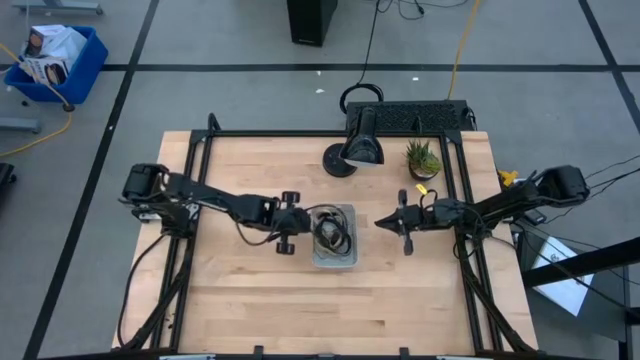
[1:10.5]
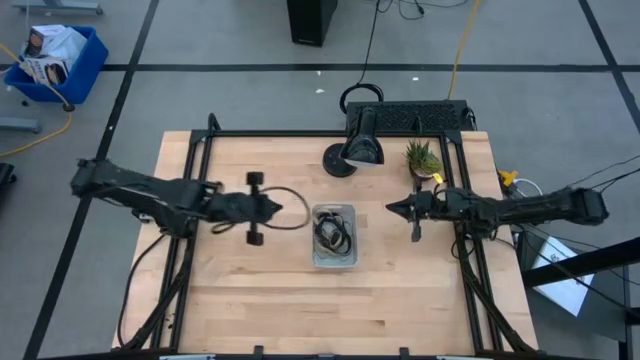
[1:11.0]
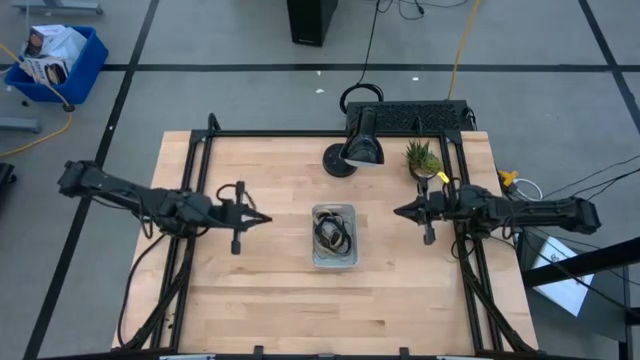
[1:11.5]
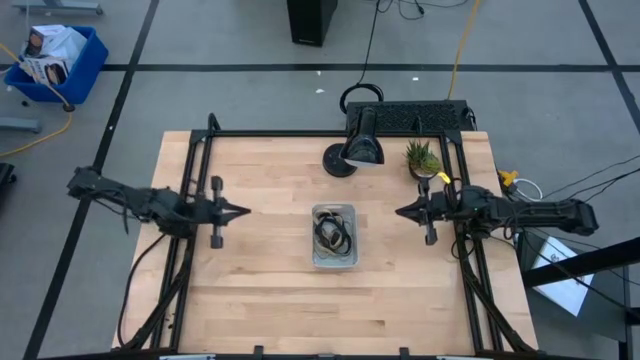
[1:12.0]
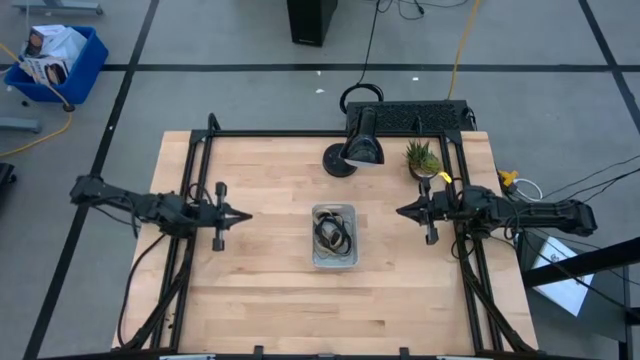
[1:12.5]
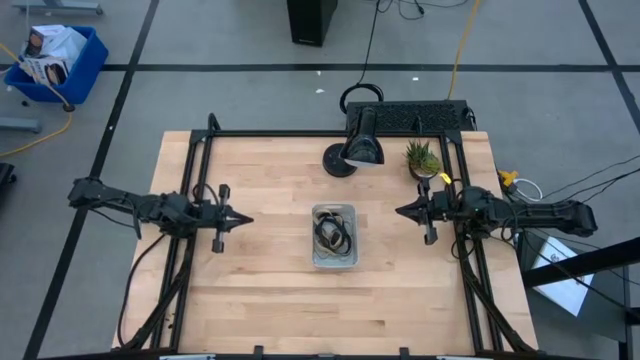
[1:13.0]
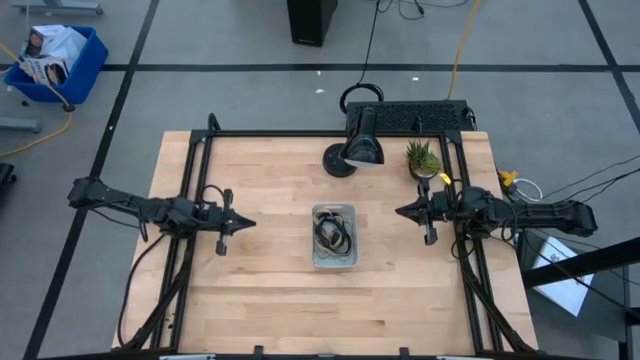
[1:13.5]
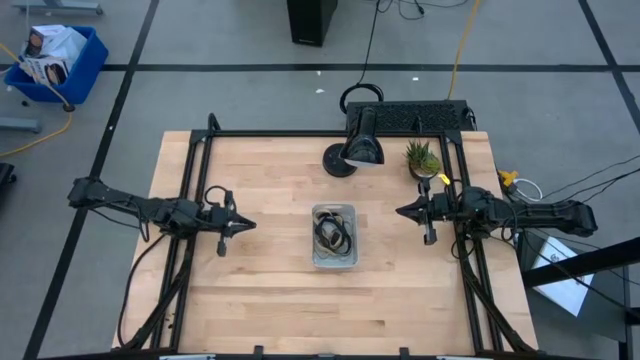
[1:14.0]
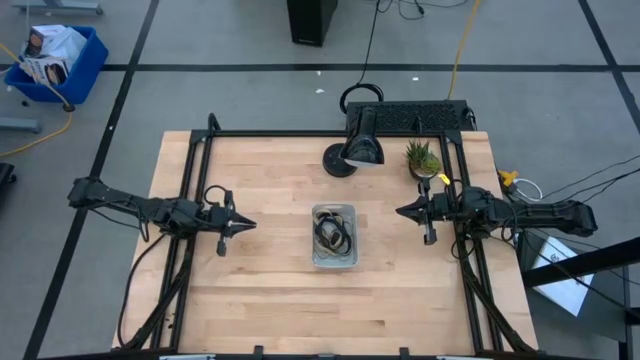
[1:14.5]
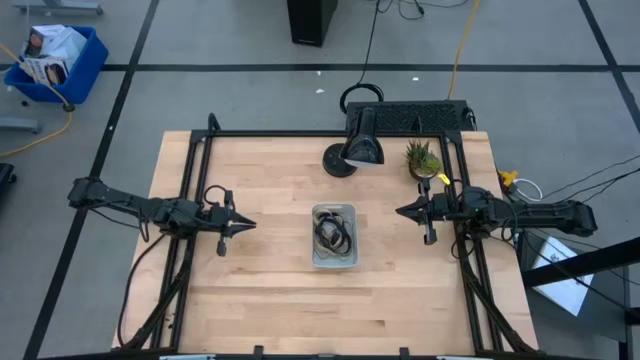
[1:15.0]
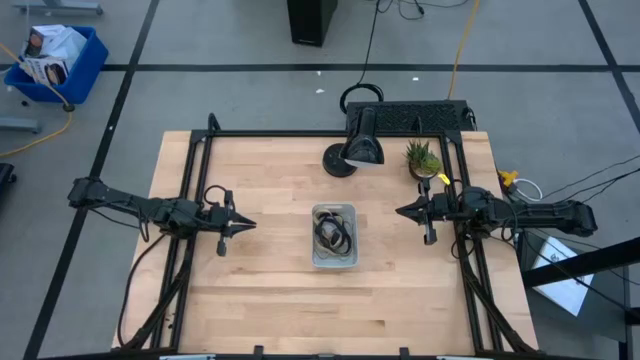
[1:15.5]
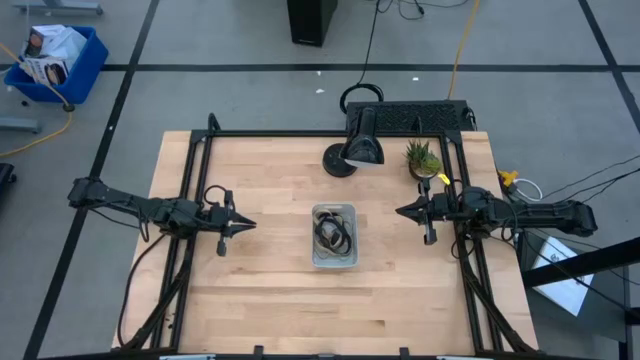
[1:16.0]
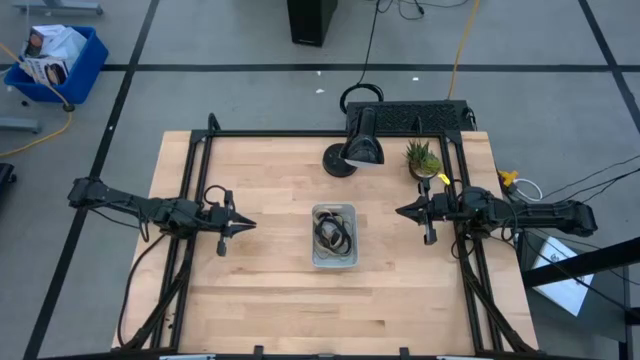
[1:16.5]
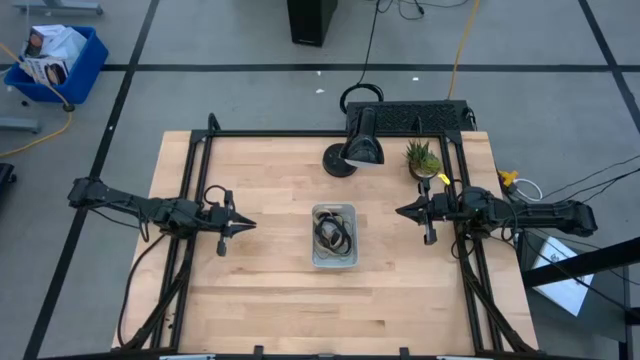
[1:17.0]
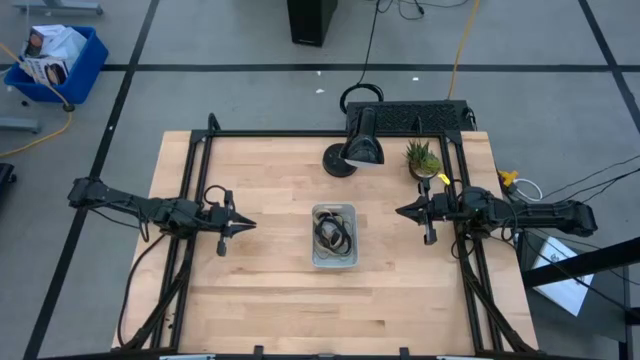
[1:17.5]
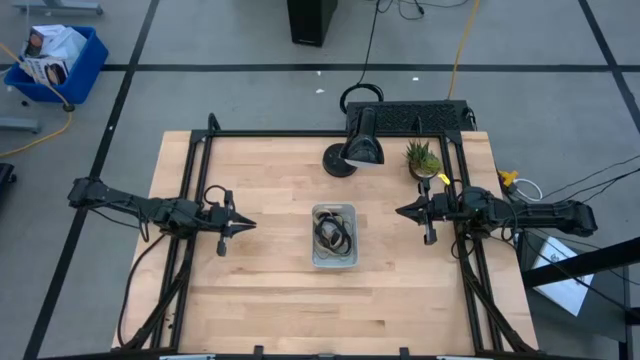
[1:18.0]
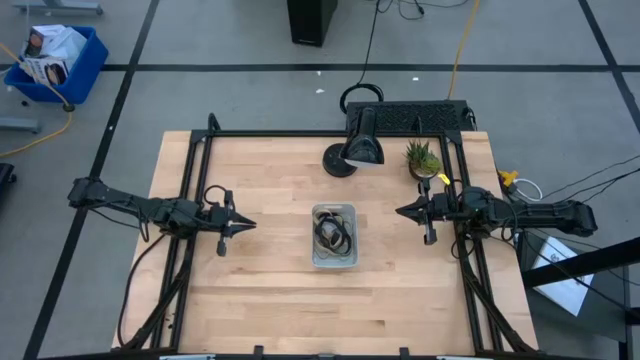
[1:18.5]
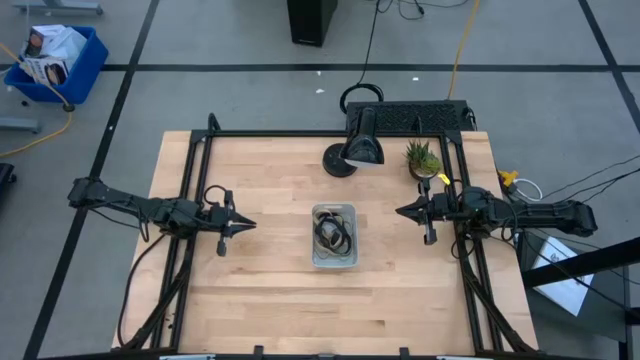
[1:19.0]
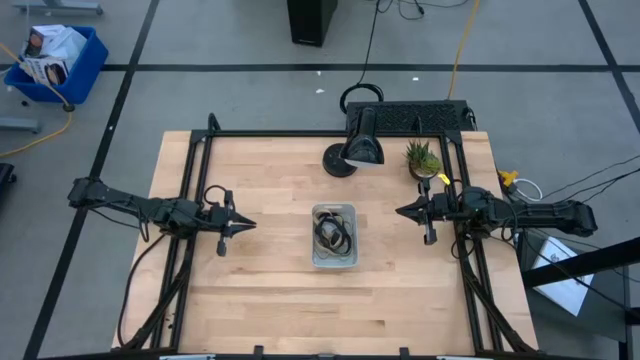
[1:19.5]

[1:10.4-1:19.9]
Task: Pick and place rubber bands into bin
Return to Home Position

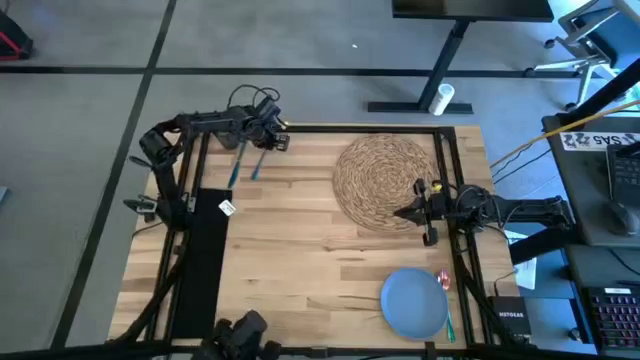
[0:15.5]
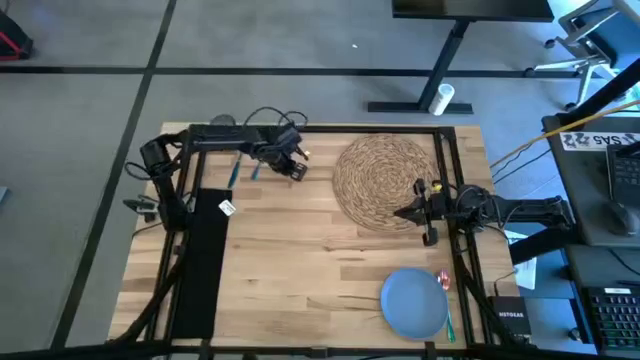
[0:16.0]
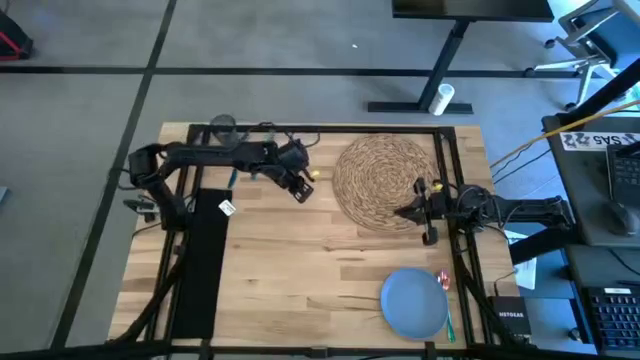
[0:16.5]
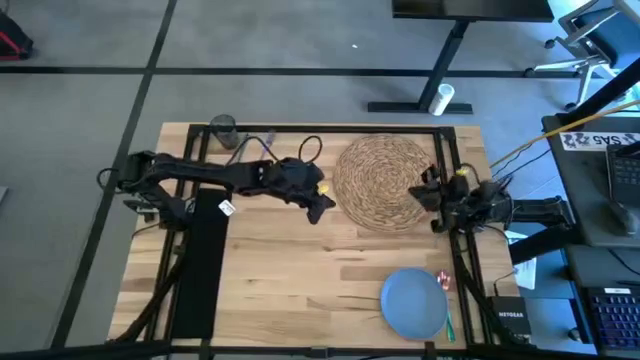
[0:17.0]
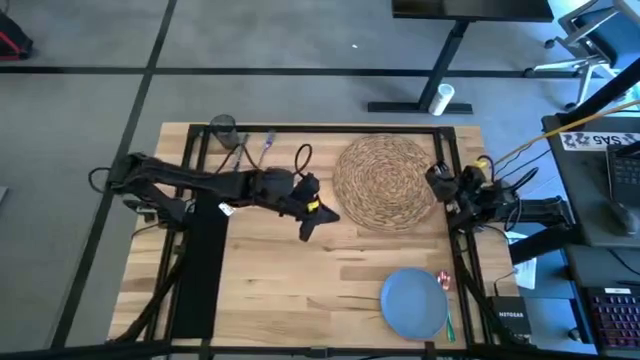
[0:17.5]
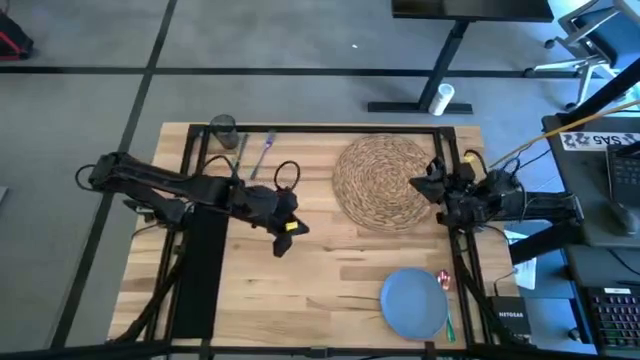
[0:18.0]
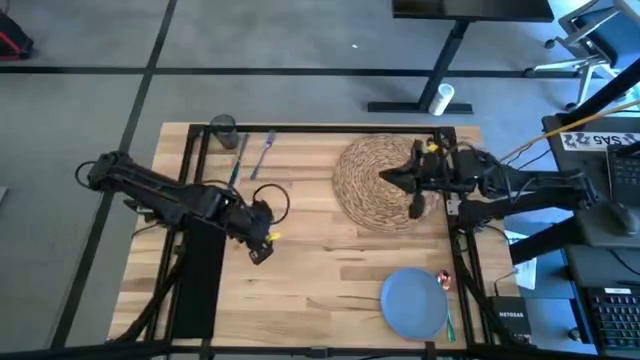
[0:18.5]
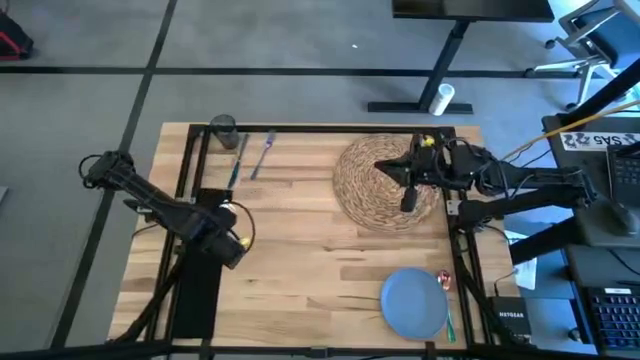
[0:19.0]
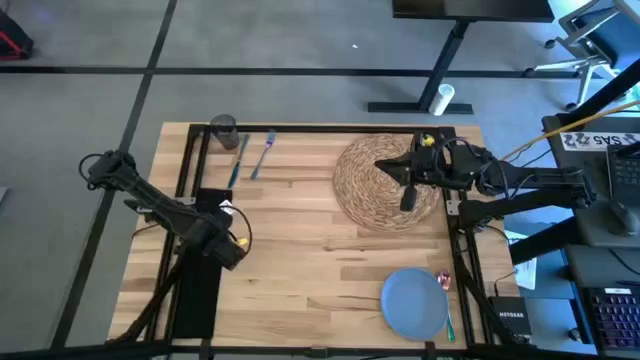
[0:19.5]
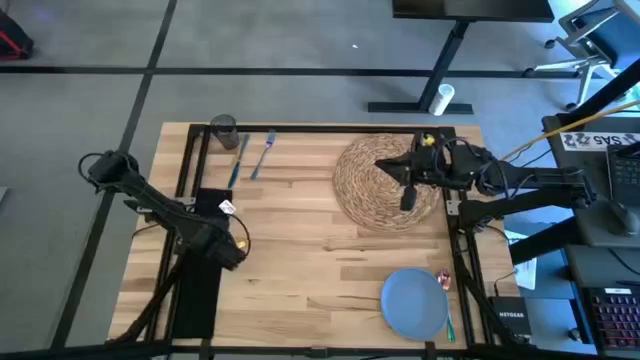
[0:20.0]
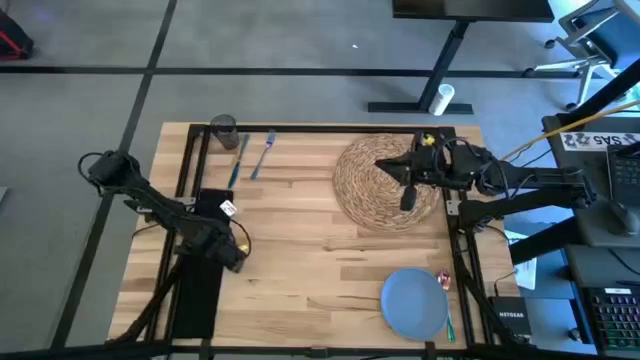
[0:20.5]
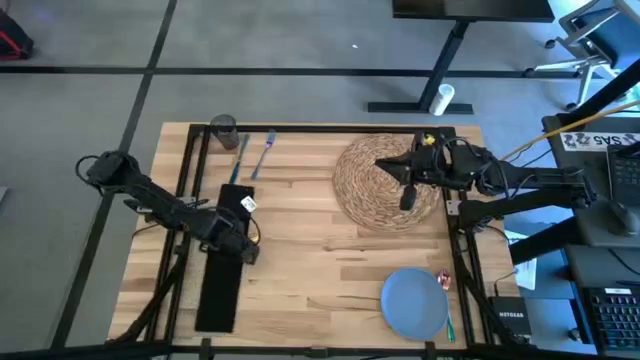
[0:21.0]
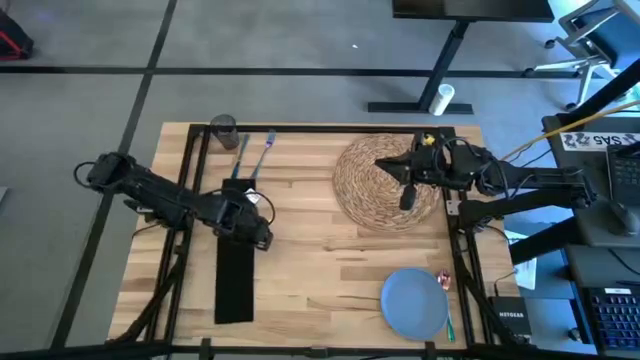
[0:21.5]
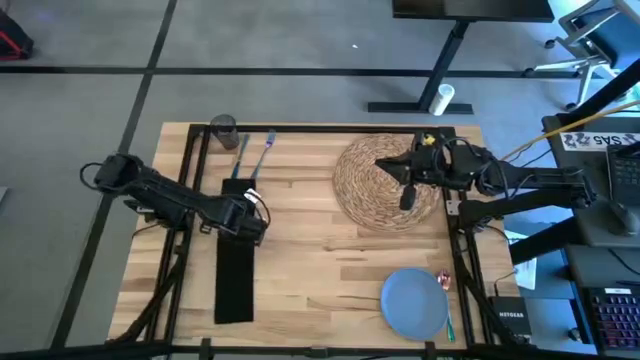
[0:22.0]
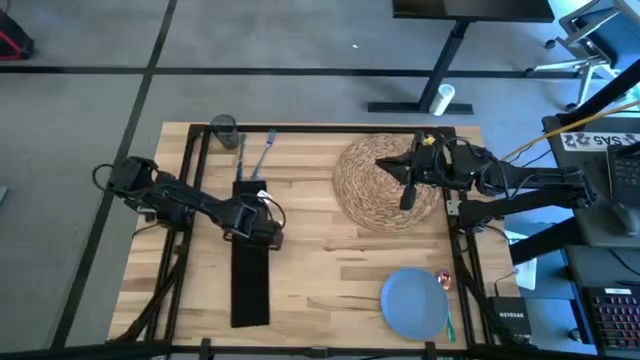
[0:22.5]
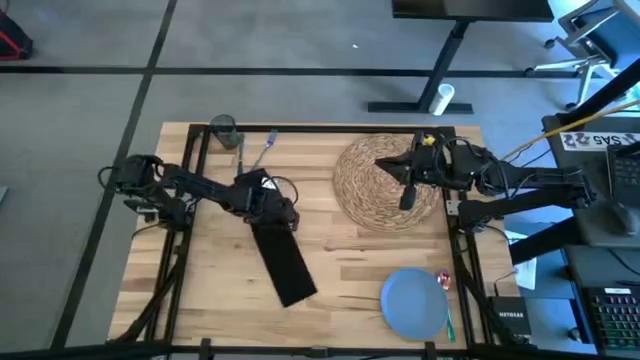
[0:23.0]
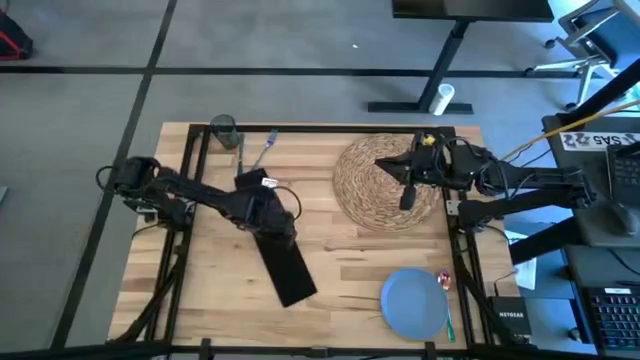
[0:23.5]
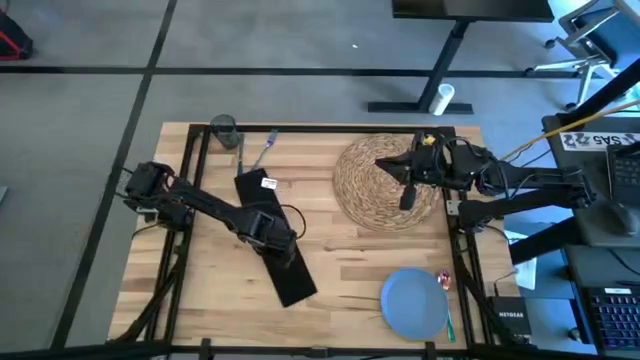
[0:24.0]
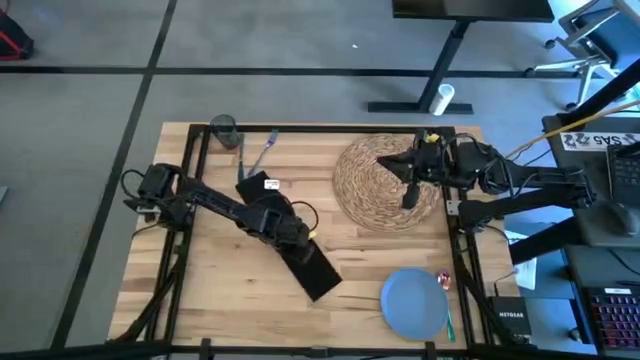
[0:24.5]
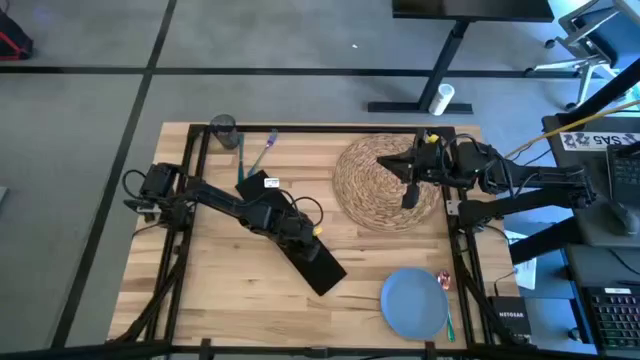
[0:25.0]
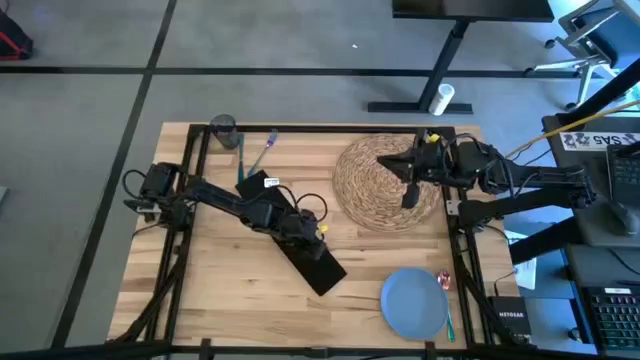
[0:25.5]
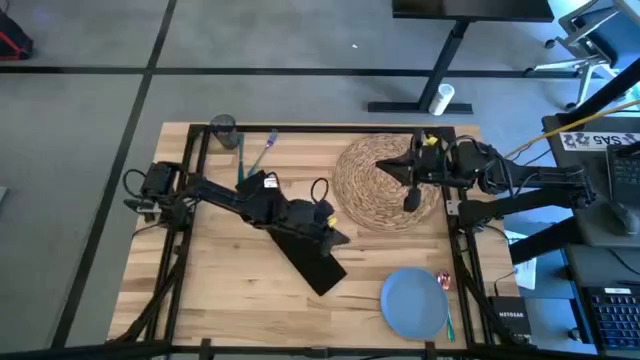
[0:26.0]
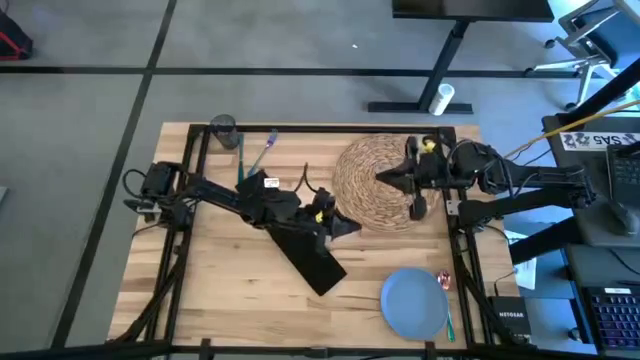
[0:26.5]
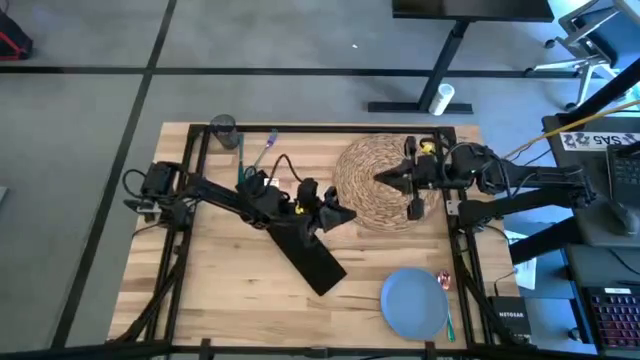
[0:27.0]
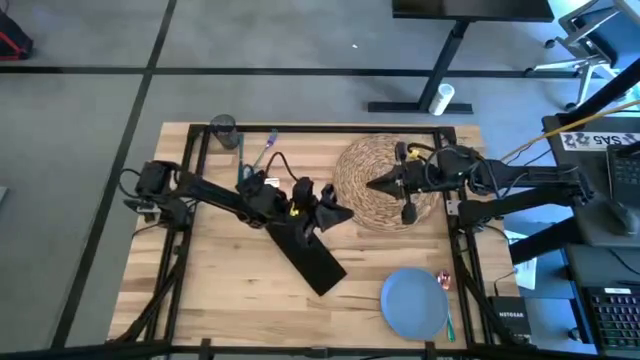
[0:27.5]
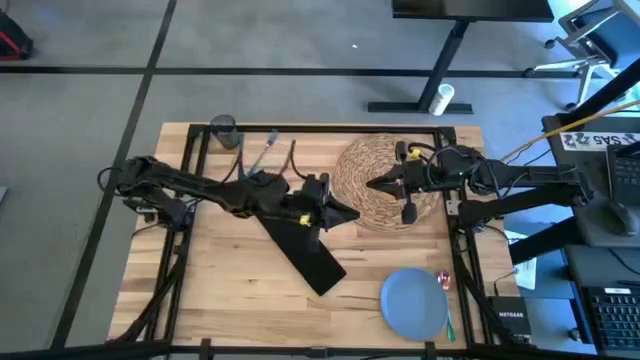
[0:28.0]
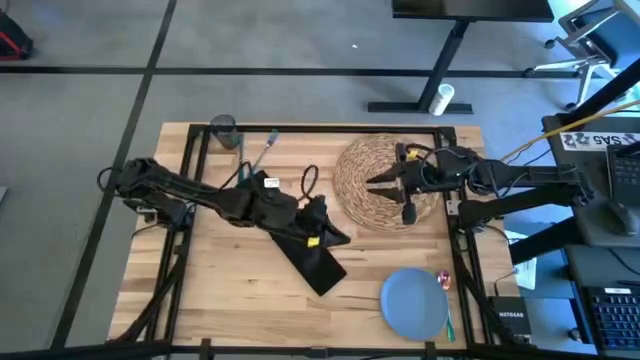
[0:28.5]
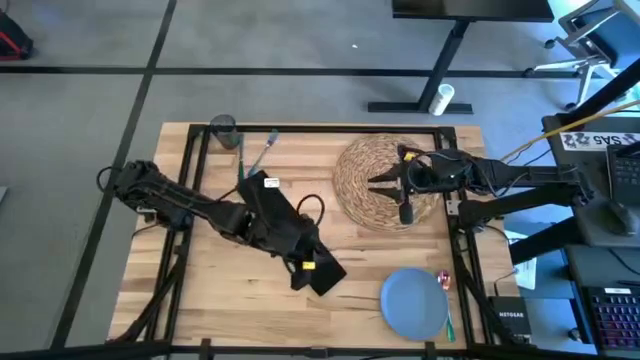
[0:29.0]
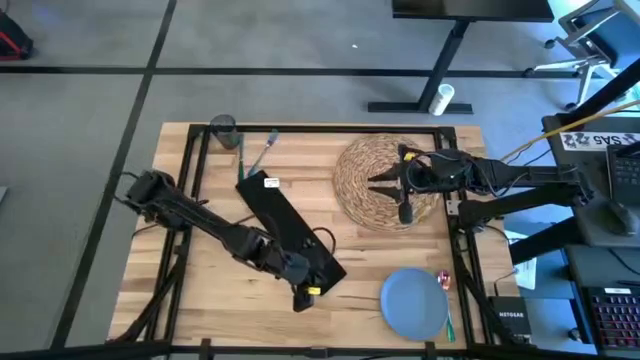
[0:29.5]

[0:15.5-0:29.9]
Task: Set table place
Fold the black table napkin
